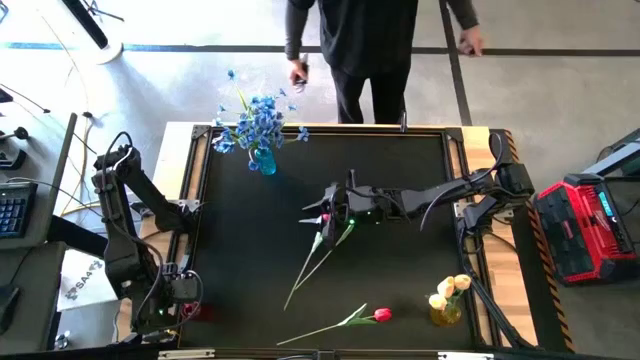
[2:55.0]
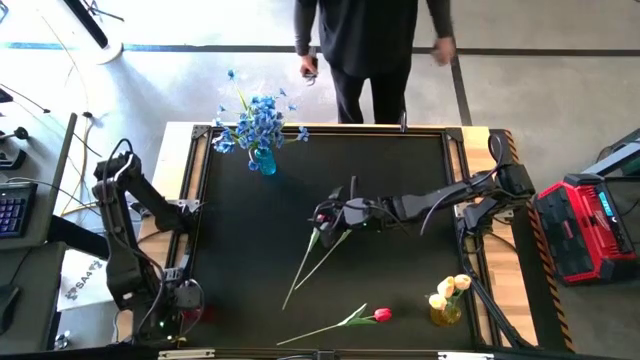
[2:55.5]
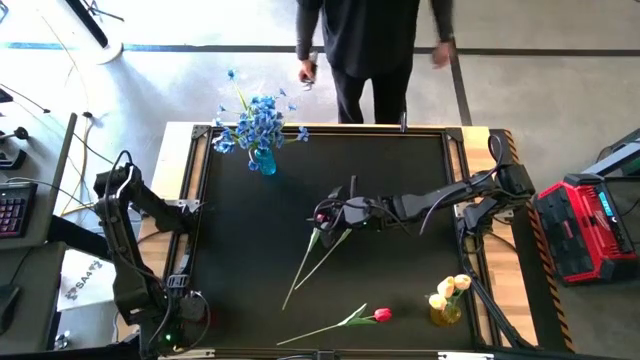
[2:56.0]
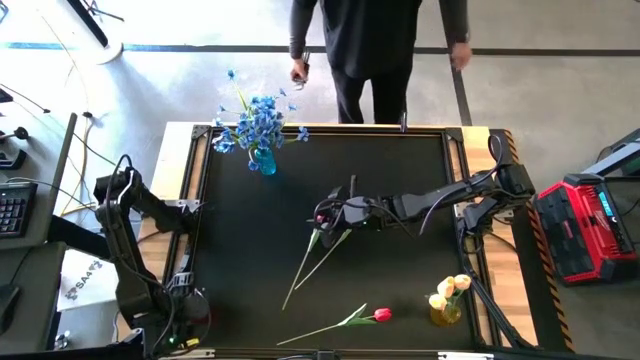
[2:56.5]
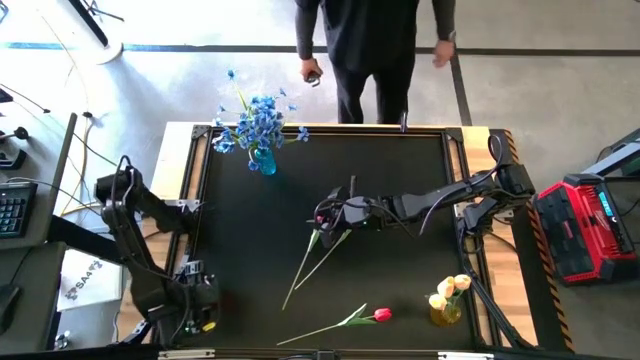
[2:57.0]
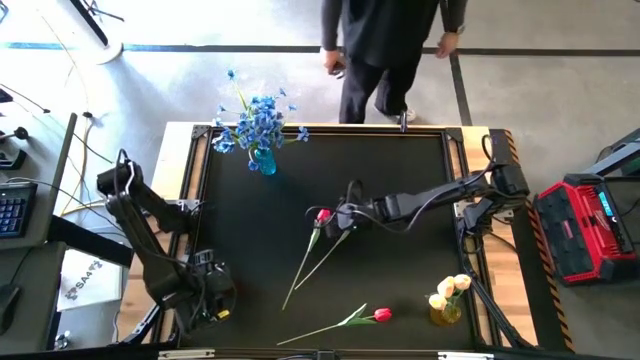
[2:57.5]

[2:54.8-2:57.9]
Task: Sort flowers into vase by color
Adjust the red vase on the bottom left of the table

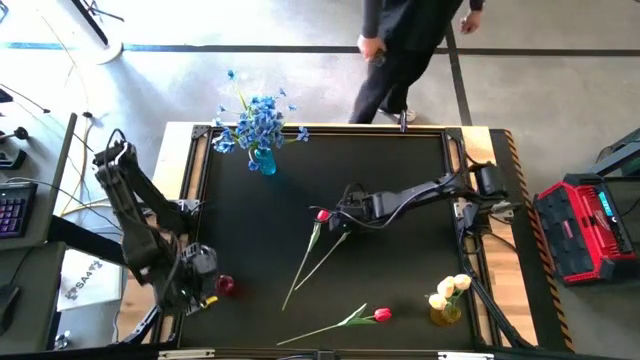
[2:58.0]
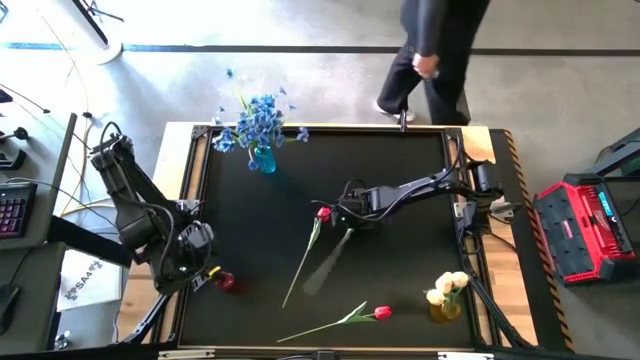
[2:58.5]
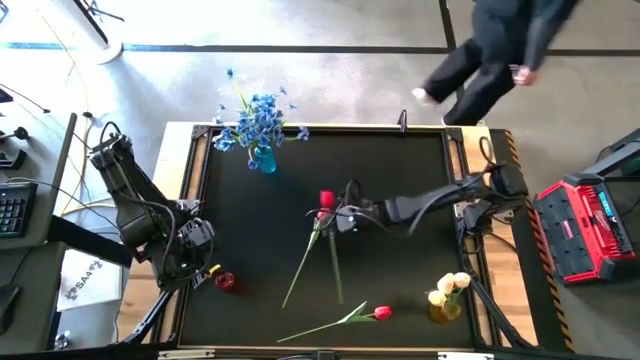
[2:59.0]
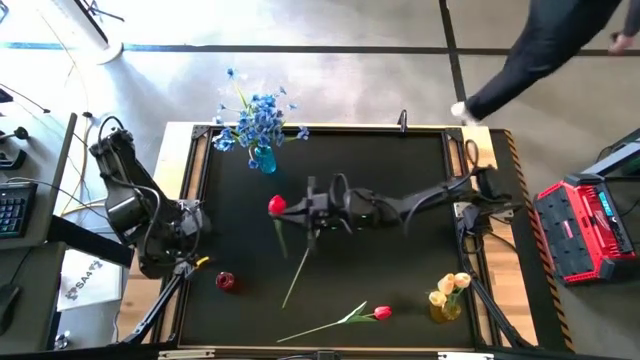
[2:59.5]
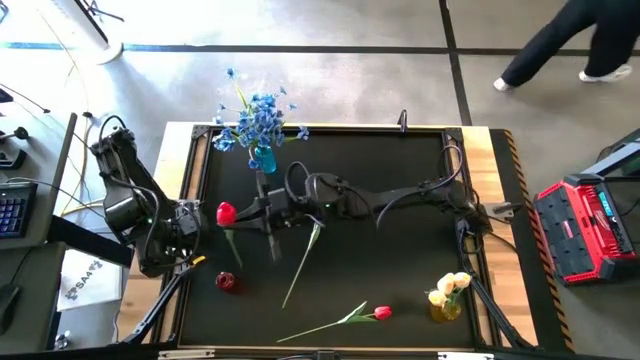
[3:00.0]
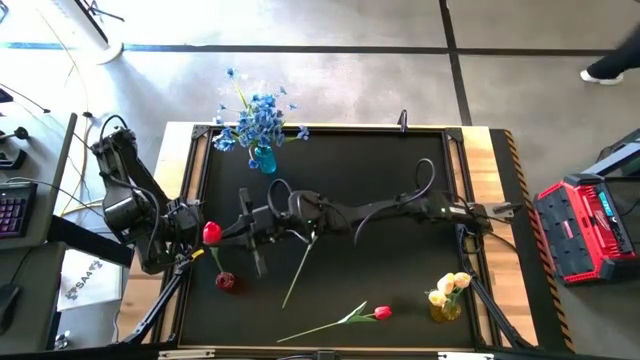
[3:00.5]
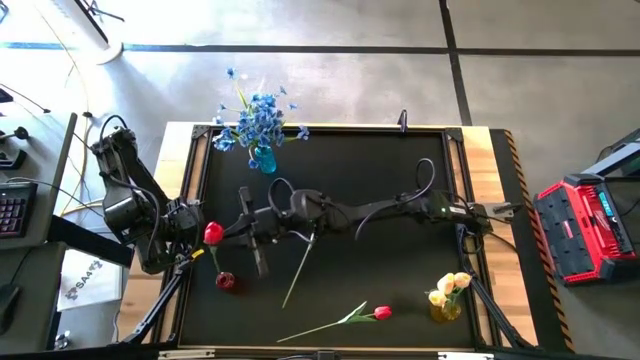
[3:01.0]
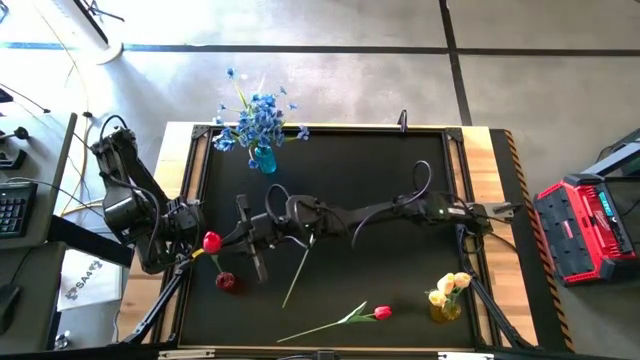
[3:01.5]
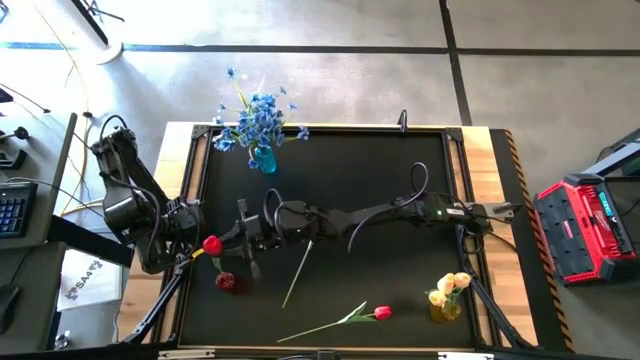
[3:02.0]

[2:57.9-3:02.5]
Put the top right red tulip into the red vase

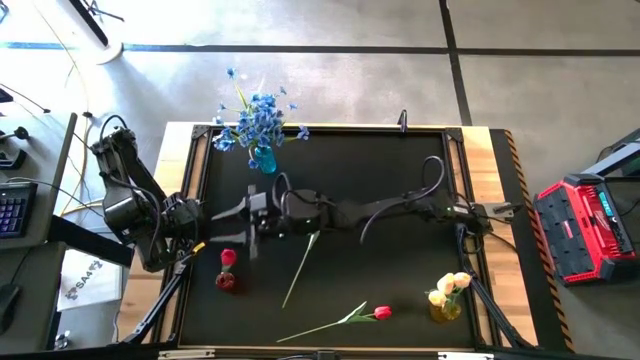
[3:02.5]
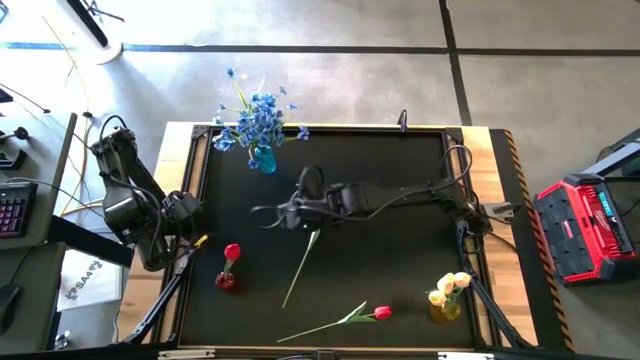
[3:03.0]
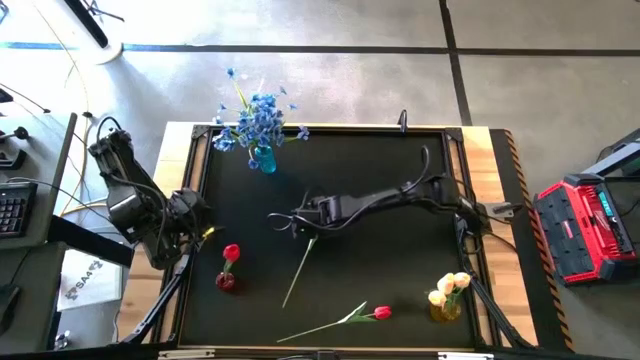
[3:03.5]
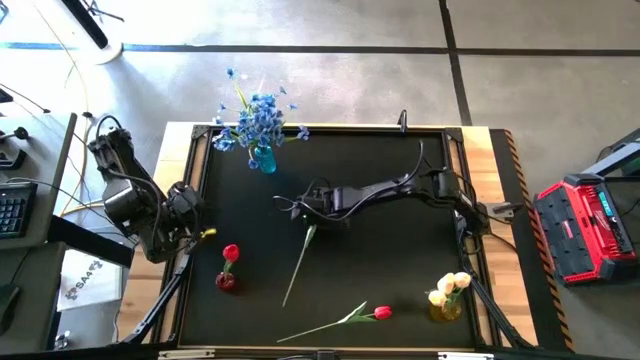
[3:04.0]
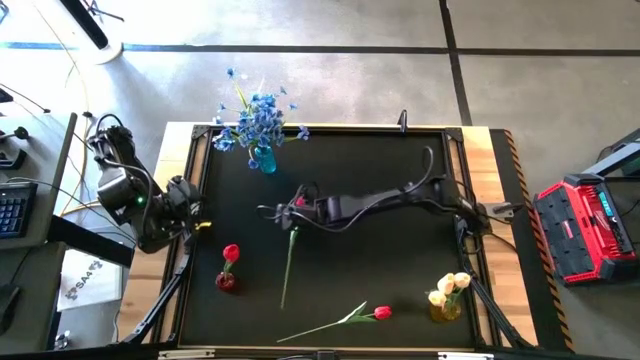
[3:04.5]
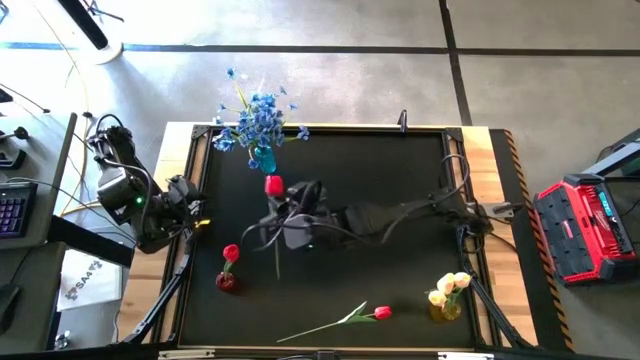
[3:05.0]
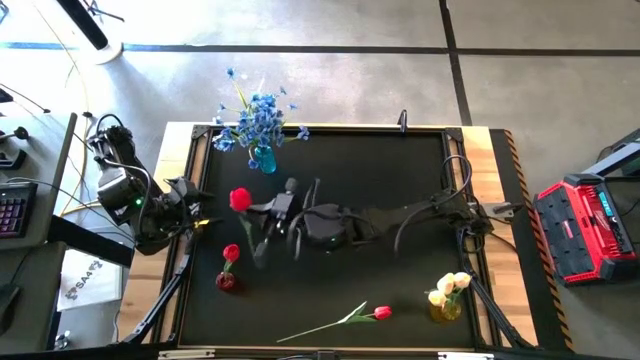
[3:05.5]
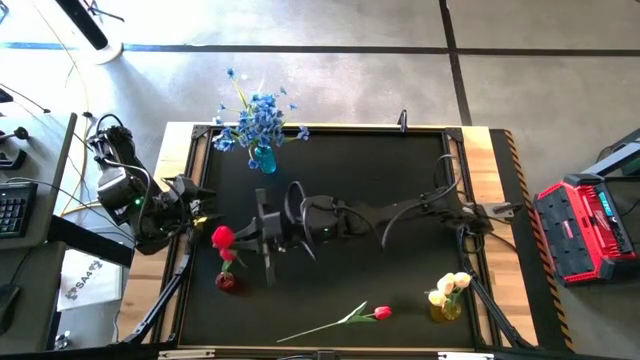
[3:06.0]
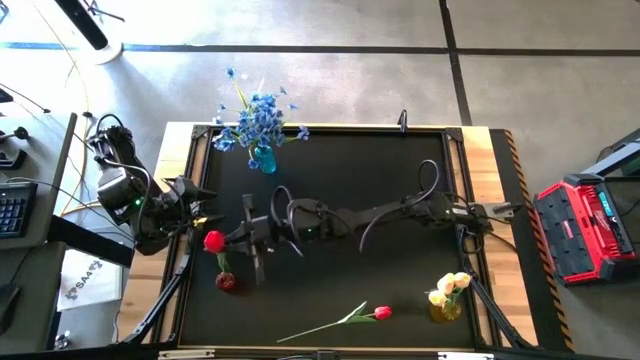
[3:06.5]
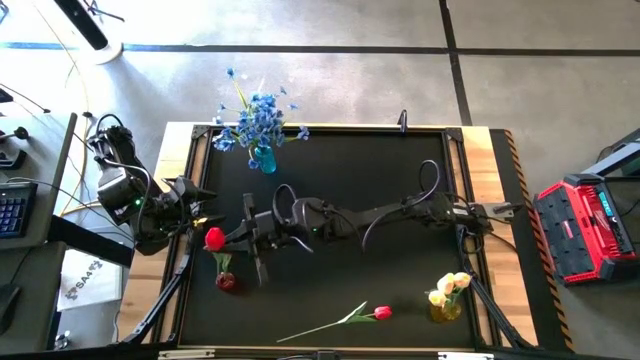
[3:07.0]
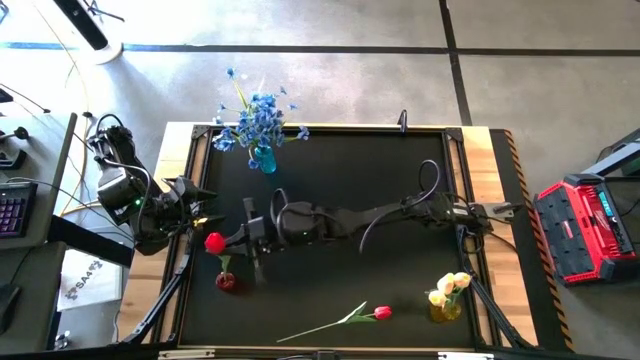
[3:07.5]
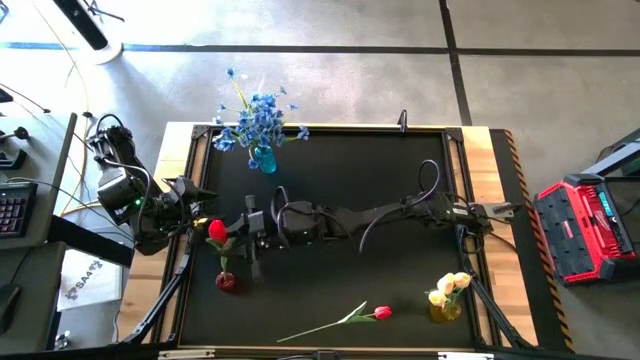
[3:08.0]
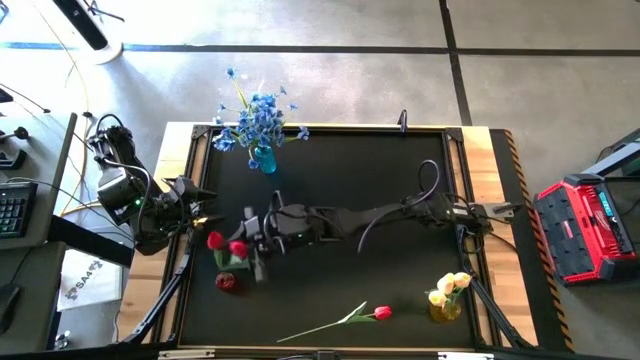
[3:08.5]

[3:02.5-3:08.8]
Put the top red tulip into the red vase

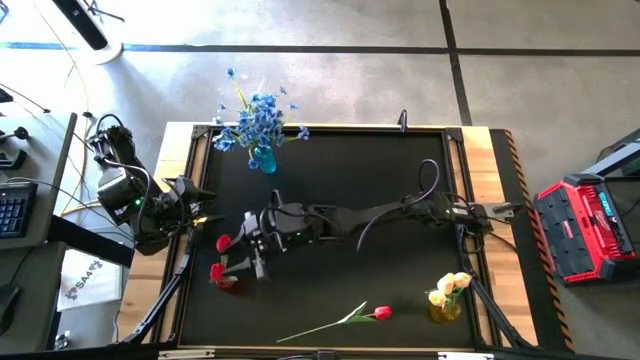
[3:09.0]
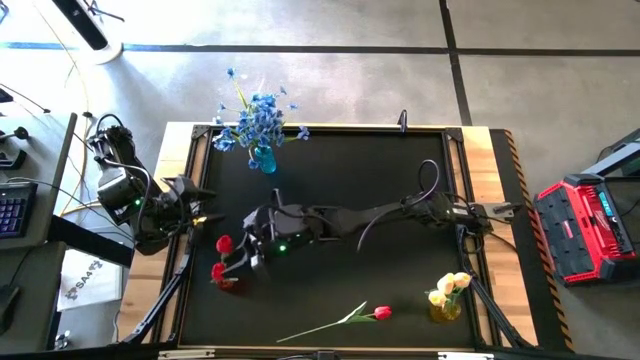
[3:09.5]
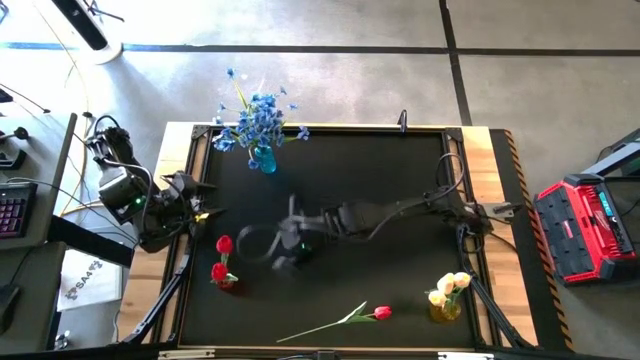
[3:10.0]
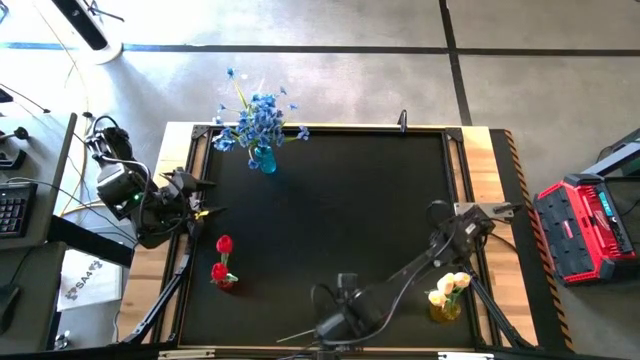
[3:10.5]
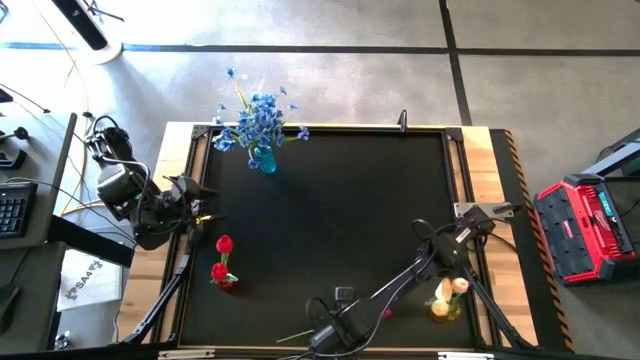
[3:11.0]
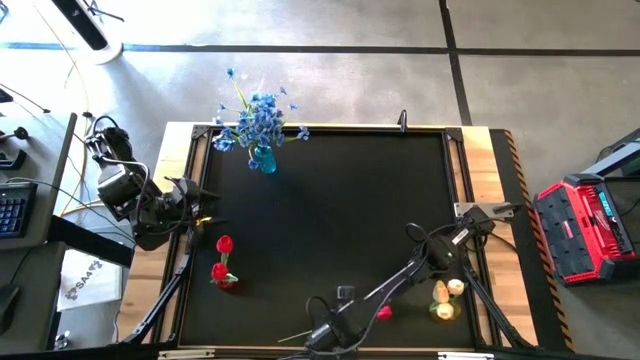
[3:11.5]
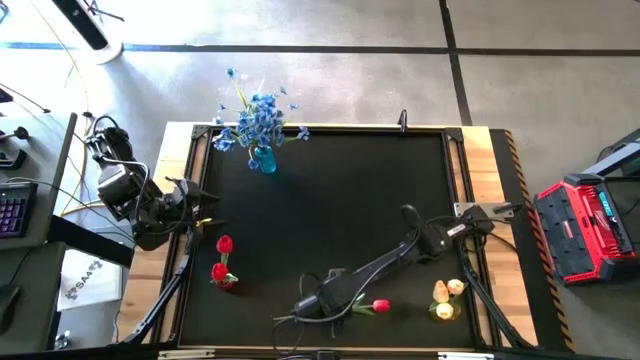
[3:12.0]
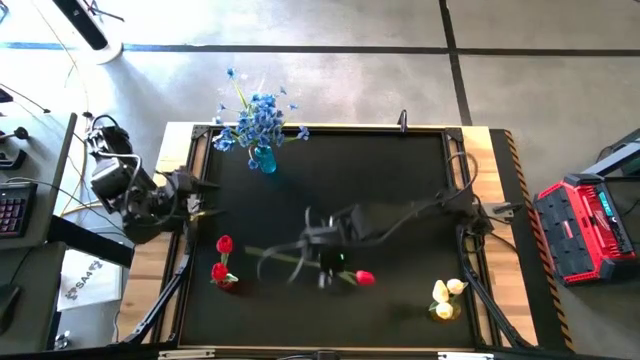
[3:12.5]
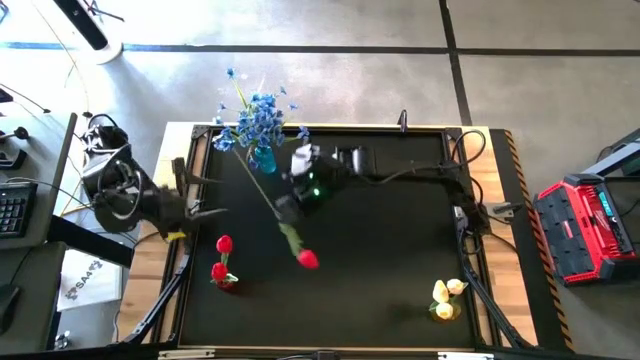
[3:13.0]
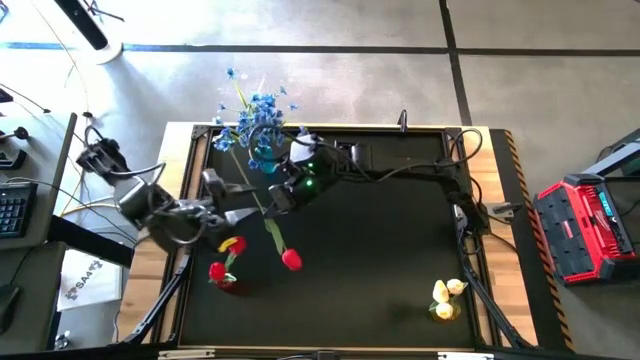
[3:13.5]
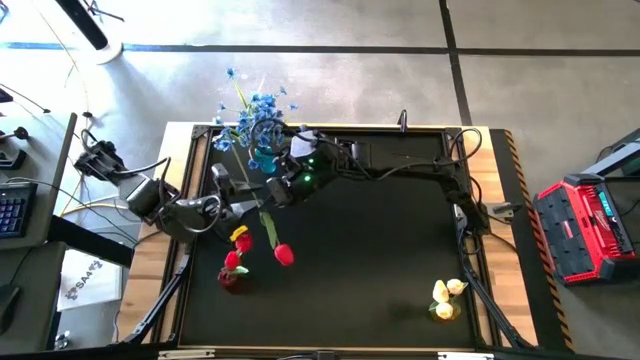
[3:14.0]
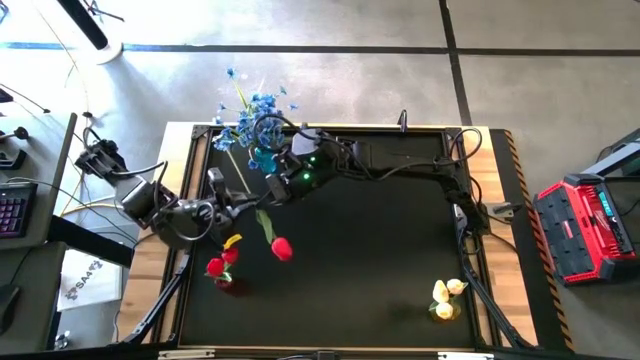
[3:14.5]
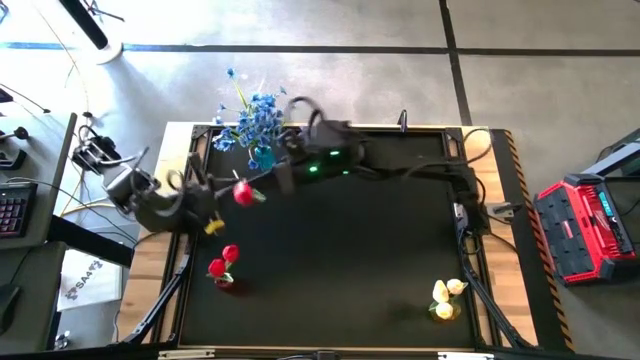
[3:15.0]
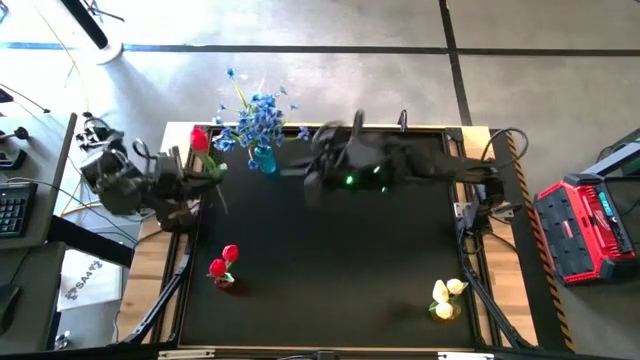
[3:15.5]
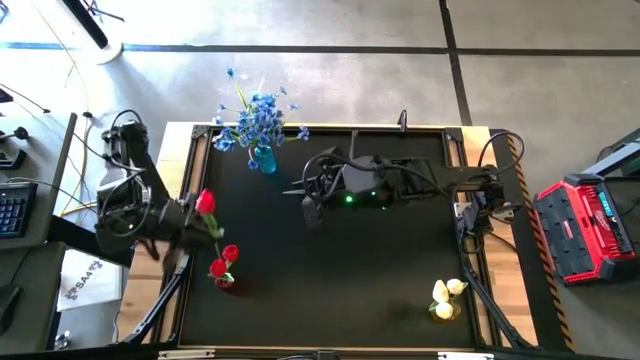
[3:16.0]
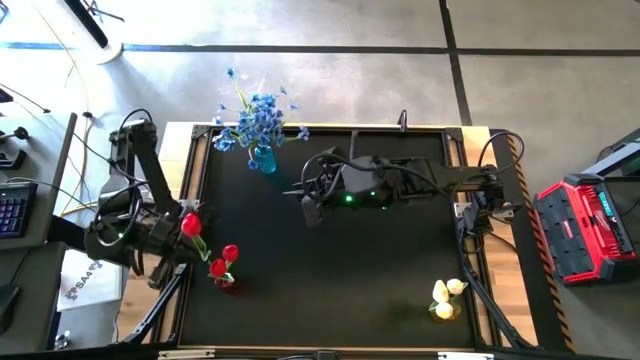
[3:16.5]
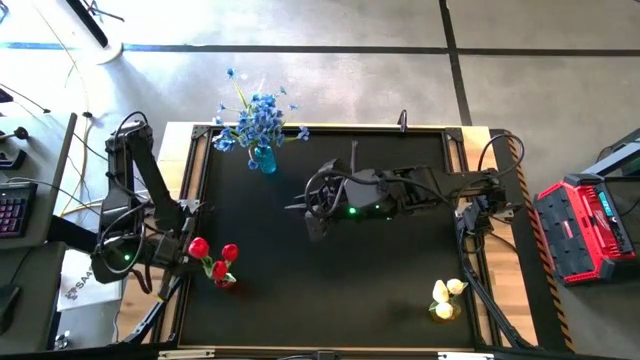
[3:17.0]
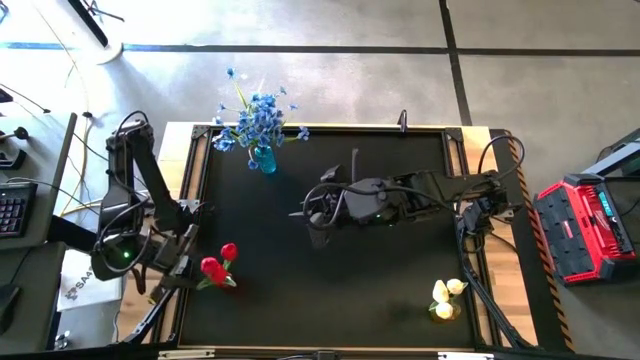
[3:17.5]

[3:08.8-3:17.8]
Put the red tulip into the red vase
